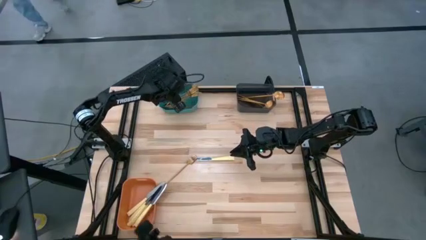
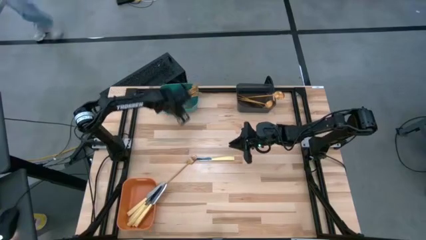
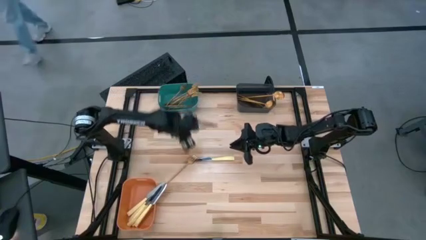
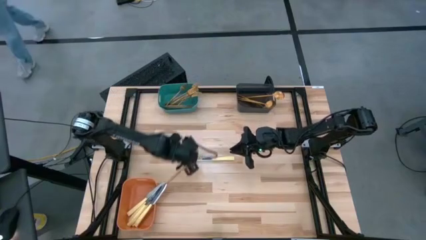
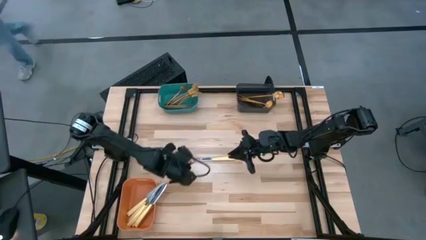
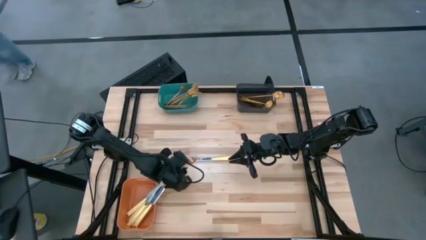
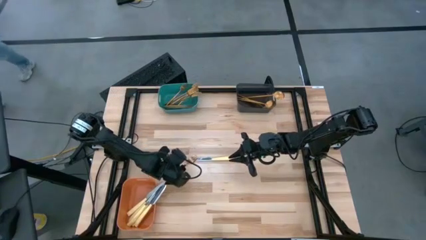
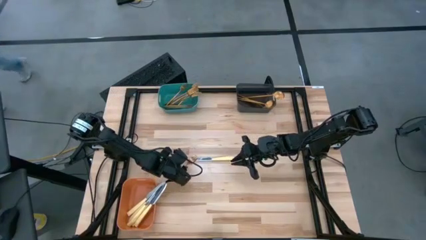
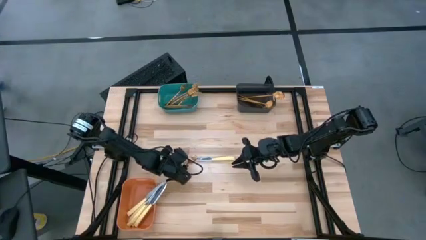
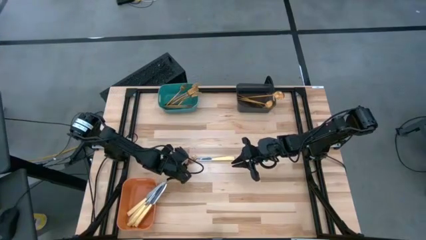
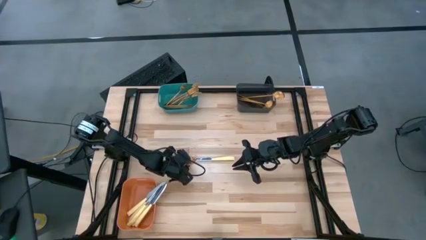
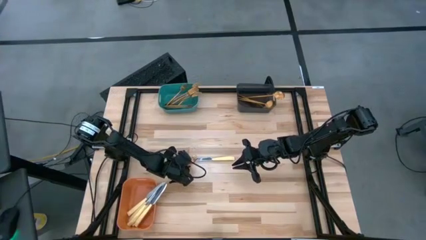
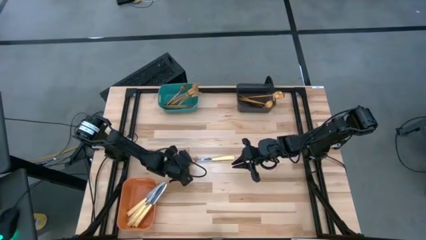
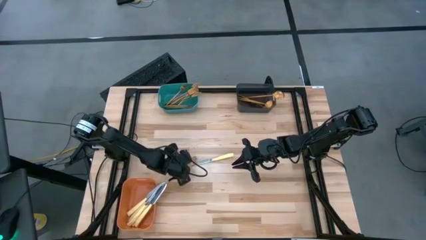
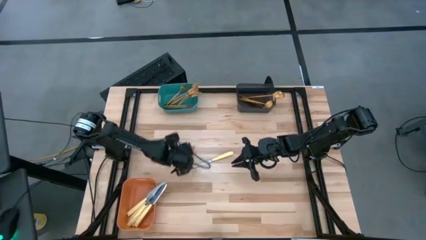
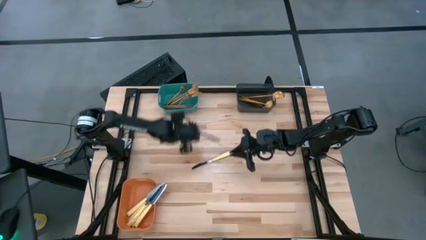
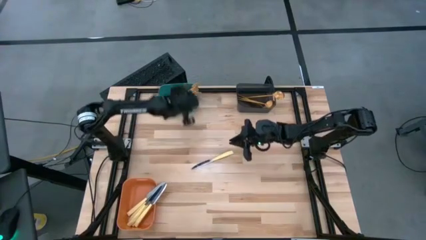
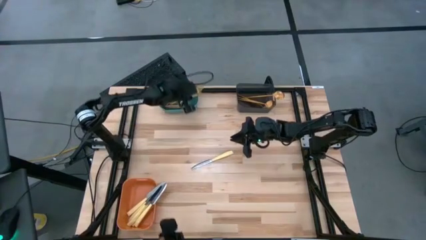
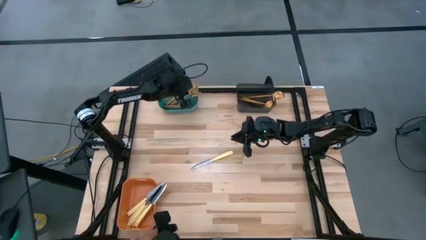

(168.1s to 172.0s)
Task: Sort silverware by color (type)
Put the gold fork into the green bin

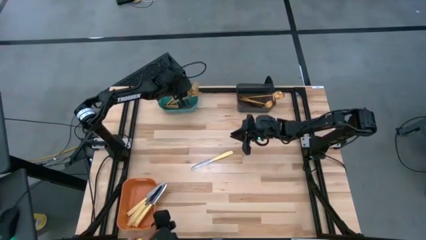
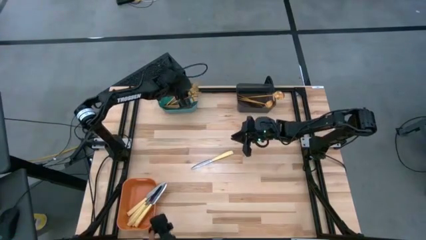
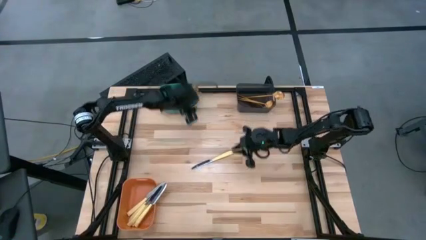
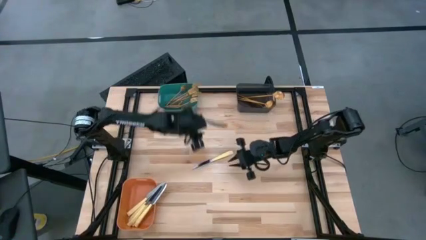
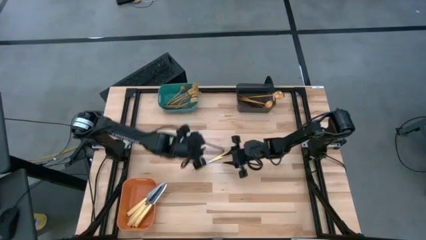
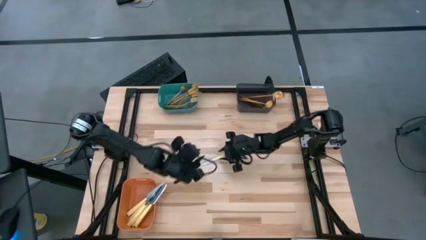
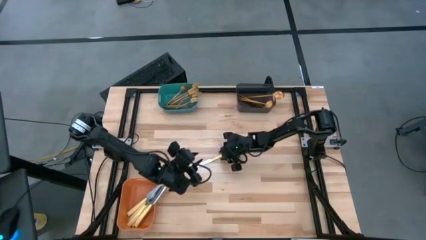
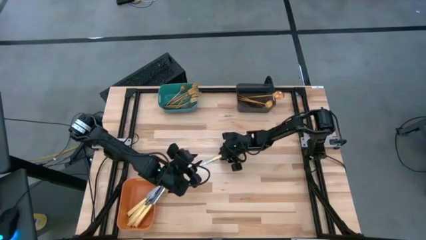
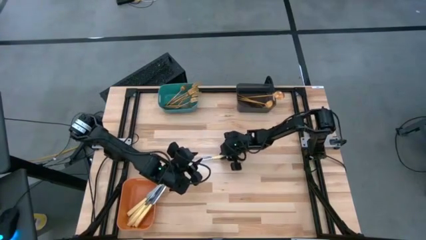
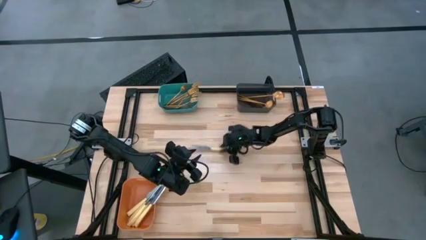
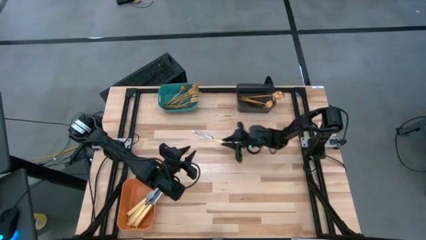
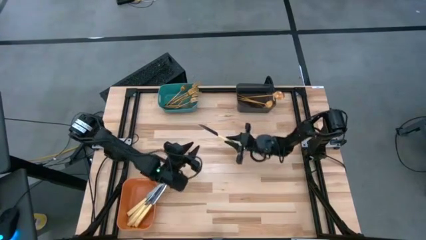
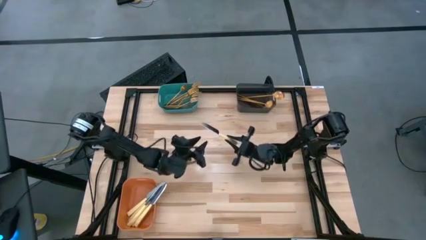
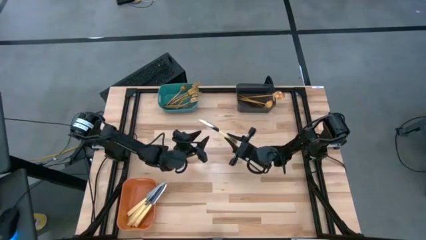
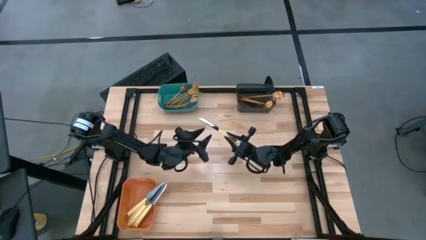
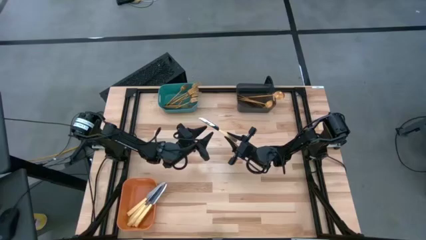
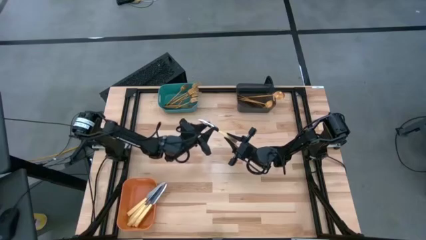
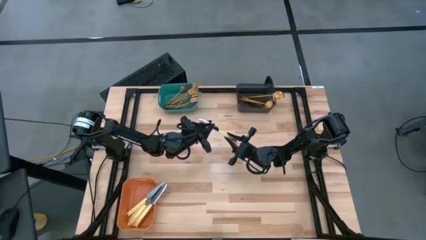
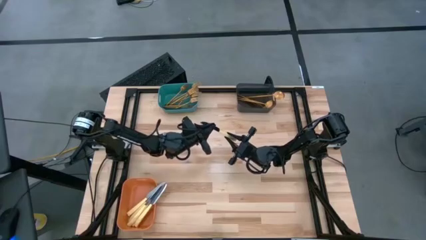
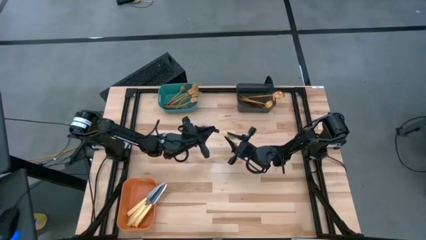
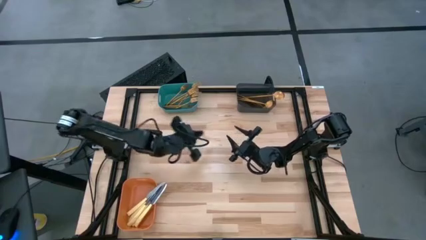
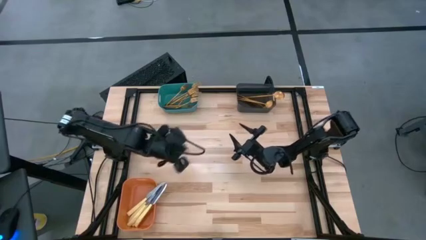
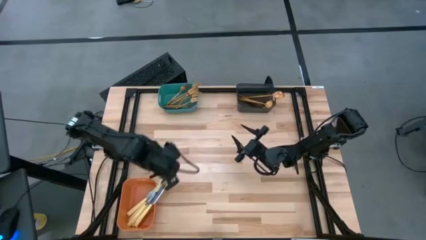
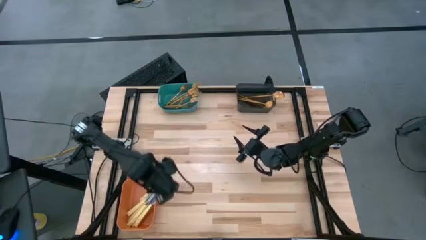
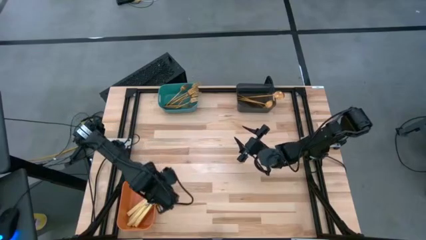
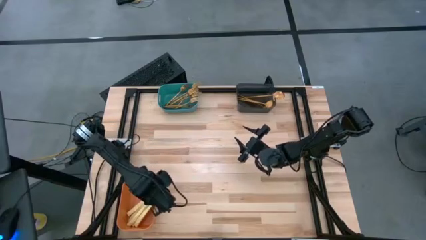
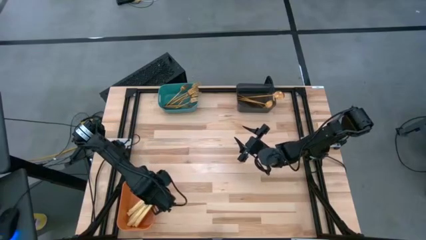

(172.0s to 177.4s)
Put the yellow table knife into the orange bin
